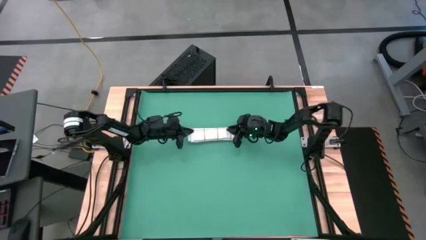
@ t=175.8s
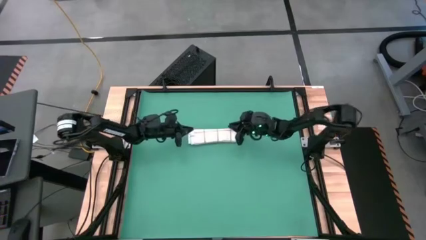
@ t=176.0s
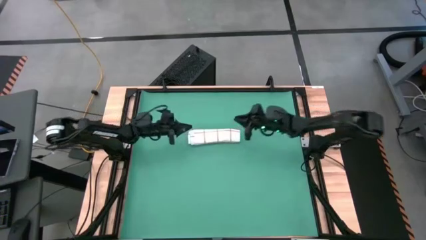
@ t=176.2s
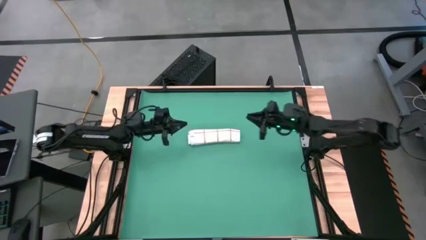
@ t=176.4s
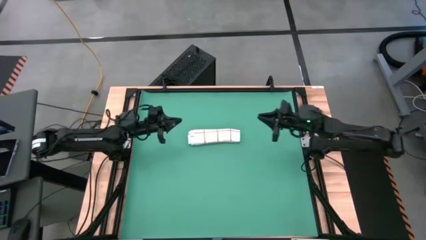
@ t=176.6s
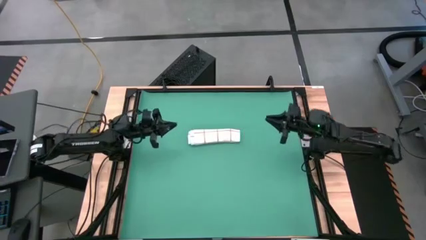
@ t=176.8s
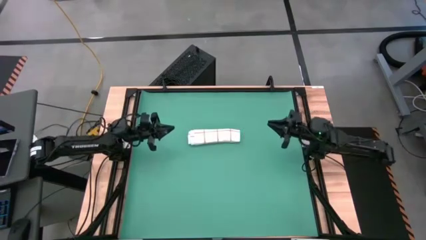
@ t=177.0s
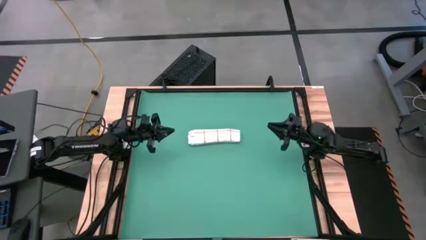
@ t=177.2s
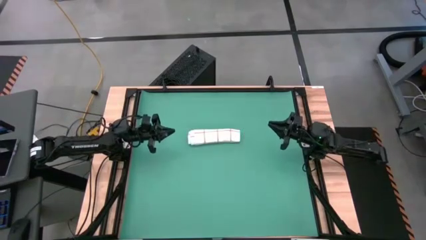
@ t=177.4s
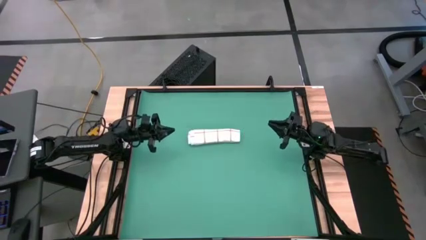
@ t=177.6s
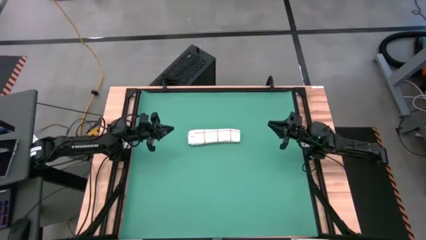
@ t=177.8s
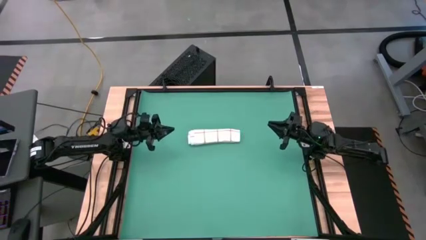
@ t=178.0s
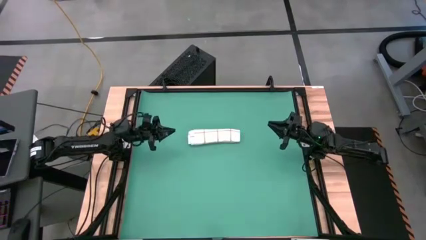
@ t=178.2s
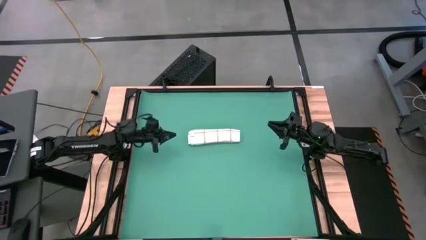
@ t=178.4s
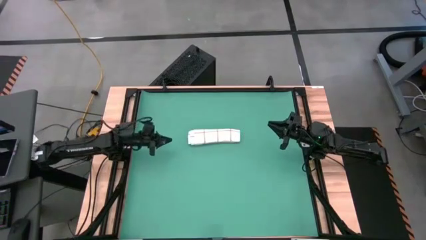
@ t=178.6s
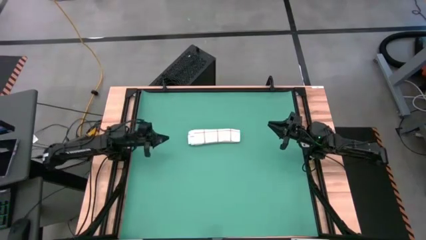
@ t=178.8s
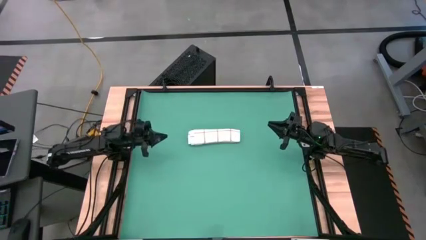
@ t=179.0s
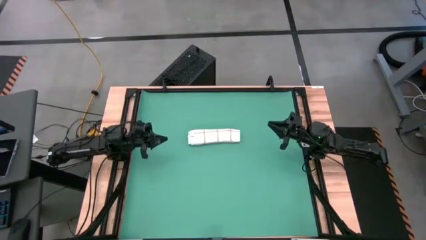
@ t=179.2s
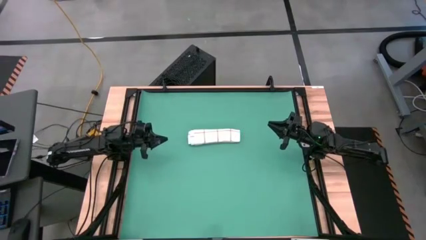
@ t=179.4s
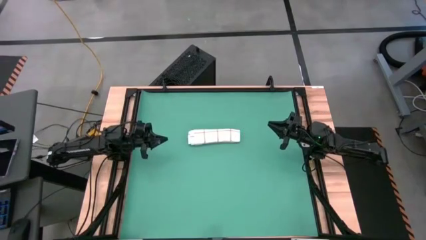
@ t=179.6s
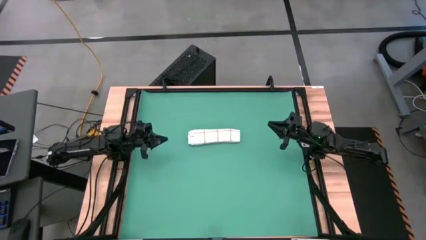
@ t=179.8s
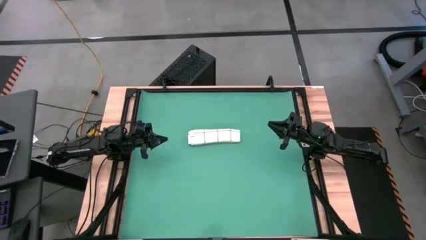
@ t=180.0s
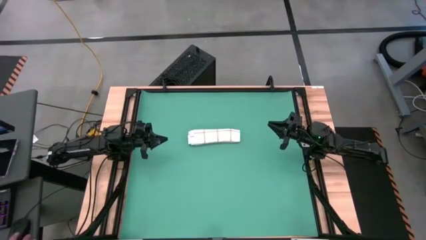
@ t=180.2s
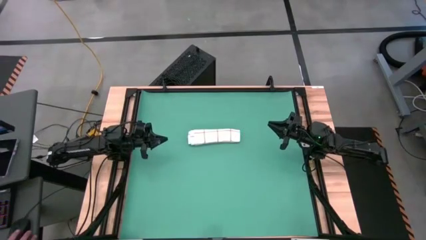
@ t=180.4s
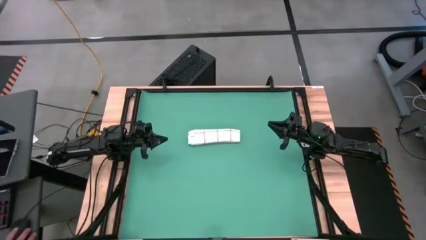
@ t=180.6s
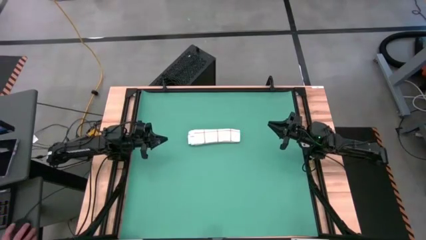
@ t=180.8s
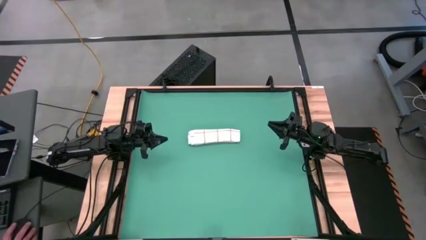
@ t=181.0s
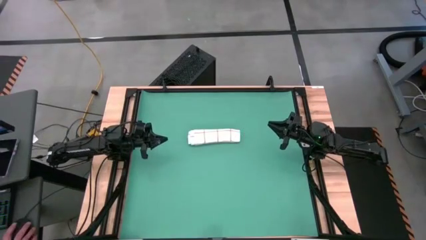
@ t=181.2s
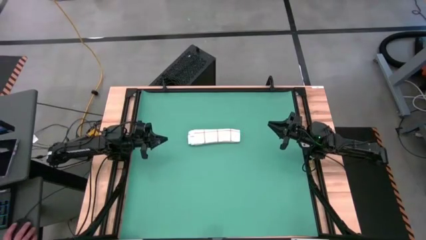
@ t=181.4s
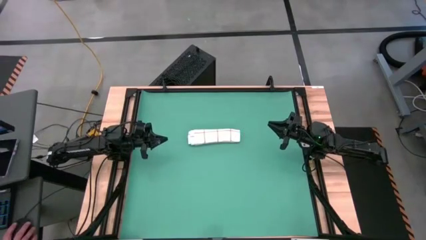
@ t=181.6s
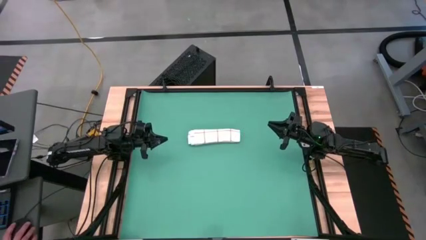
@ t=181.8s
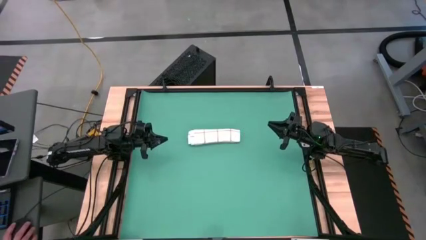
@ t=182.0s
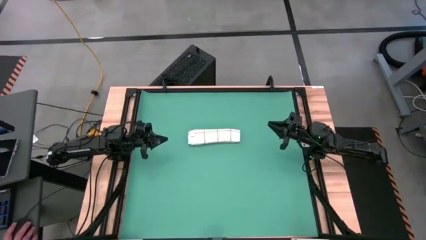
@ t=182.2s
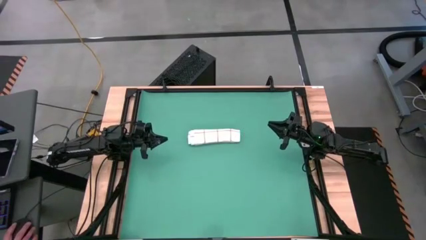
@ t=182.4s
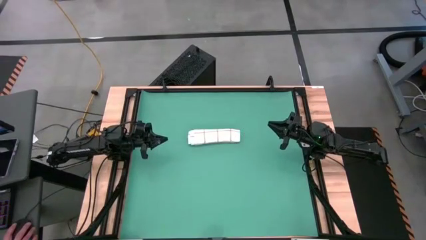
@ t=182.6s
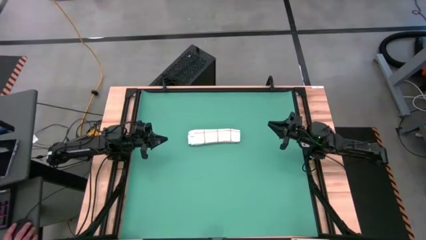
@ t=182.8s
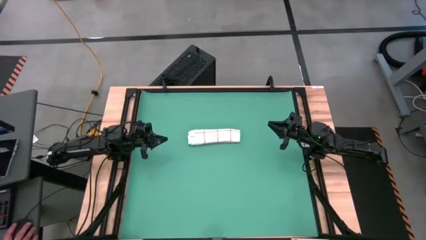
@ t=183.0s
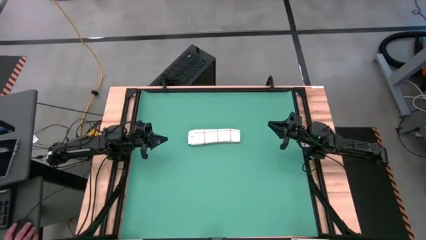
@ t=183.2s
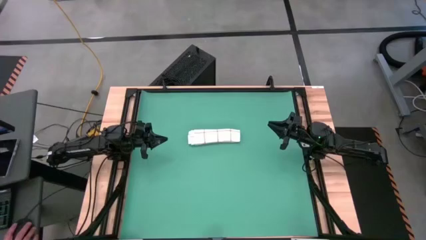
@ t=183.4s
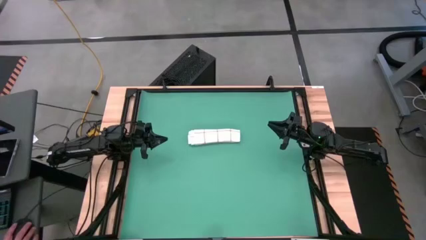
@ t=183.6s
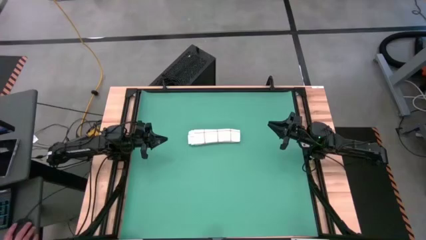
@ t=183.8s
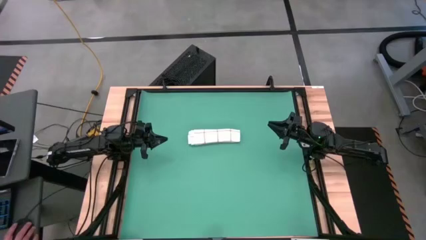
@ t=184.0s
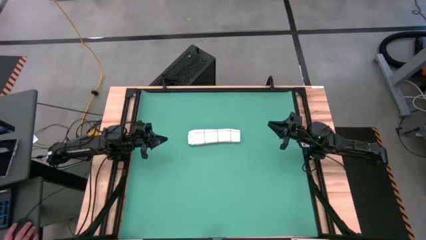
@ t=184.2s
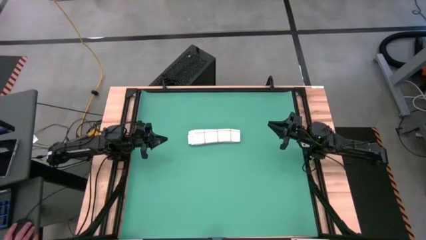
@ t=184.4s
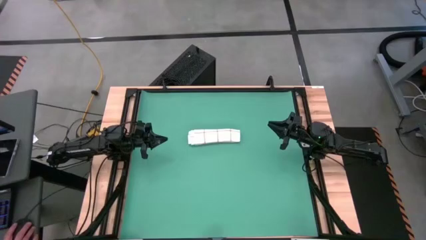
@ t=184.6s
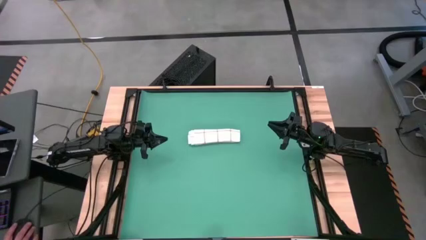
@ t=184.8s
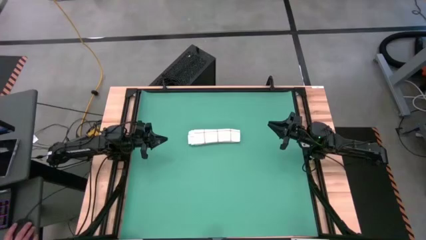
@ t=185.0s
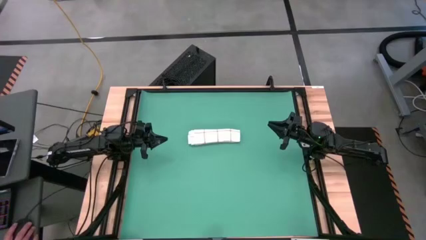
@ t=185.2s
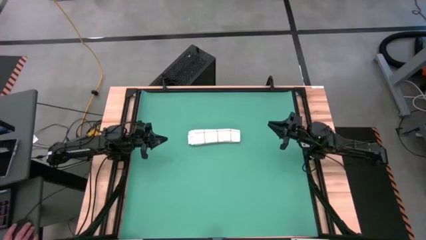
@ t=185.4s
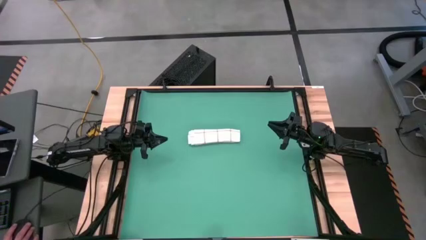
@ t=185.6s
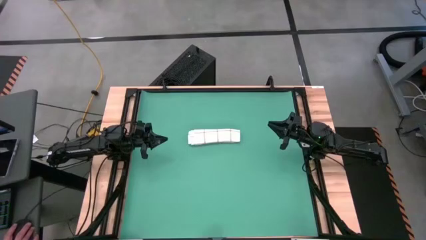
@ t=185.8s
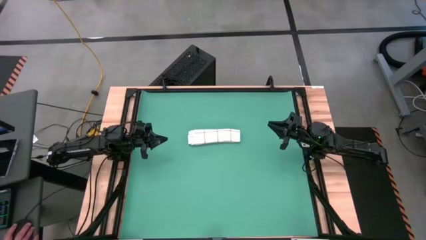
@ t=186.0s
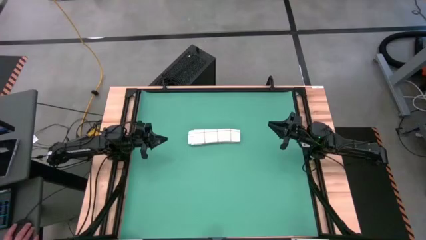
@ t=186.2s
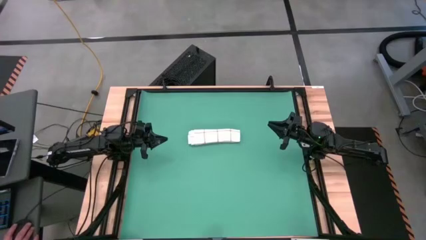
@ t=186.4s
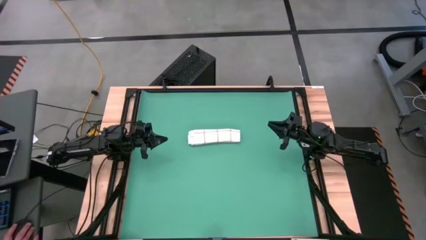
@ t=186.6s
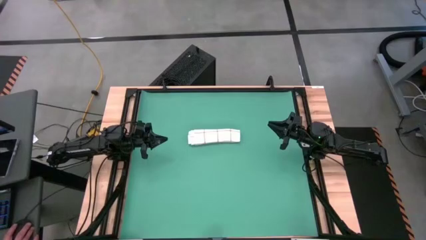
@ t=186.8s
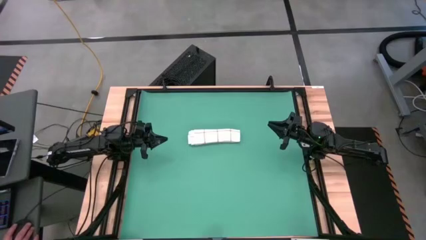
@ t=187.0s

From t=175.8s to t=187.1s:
Task: Roll towel into tight, uniform cylinder
Return to Home Position

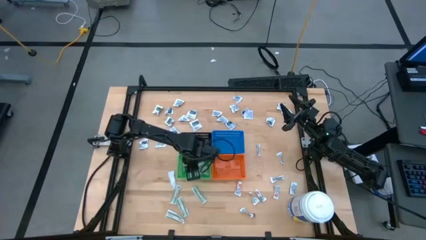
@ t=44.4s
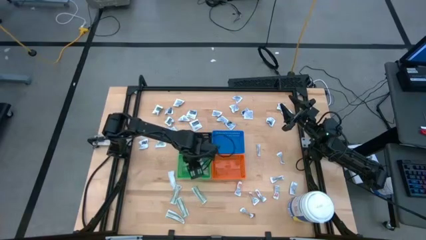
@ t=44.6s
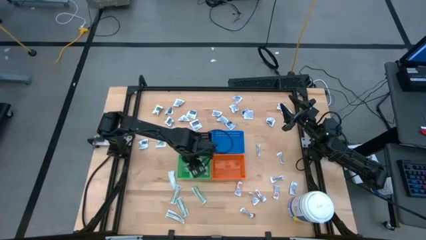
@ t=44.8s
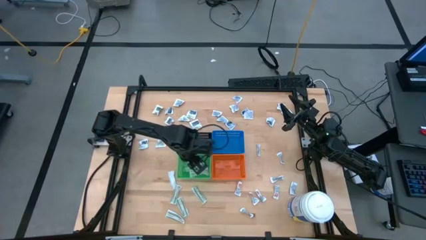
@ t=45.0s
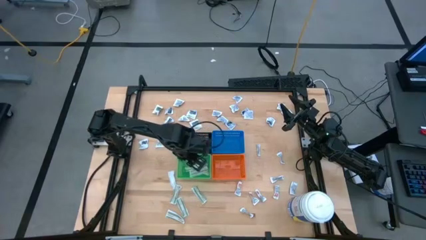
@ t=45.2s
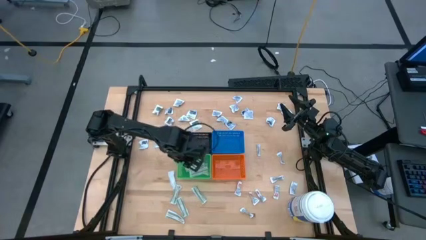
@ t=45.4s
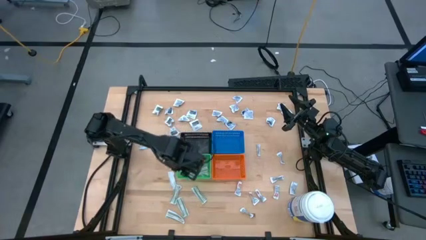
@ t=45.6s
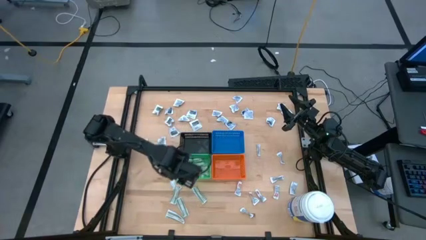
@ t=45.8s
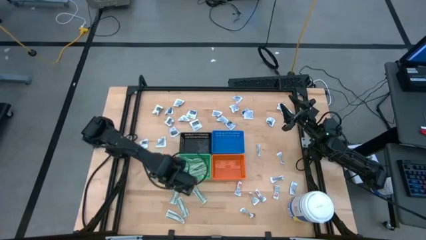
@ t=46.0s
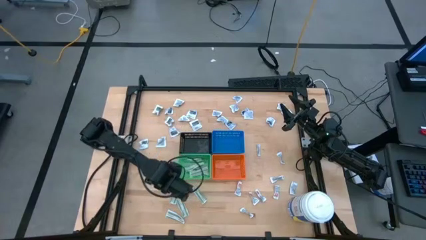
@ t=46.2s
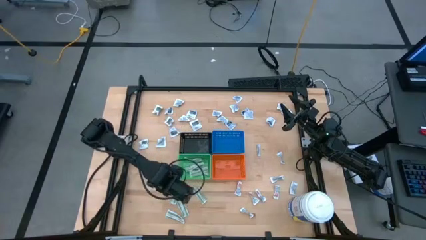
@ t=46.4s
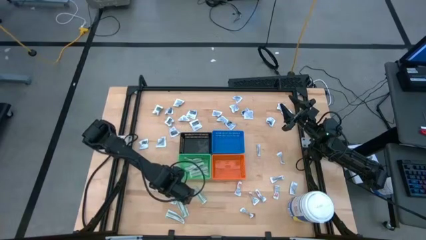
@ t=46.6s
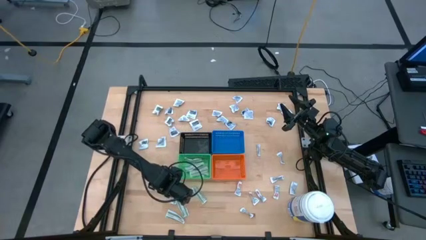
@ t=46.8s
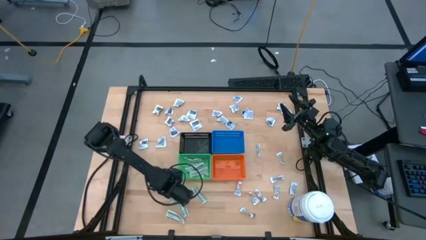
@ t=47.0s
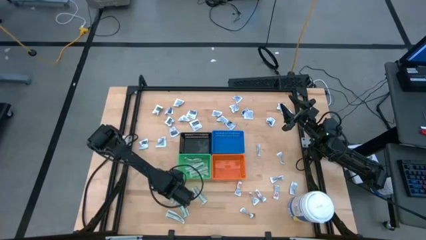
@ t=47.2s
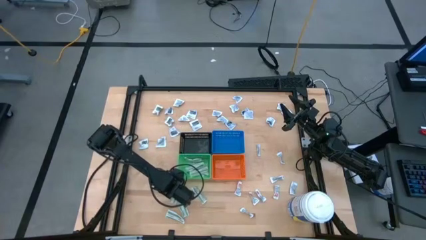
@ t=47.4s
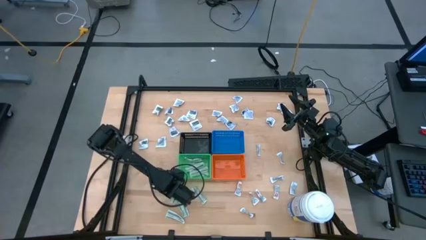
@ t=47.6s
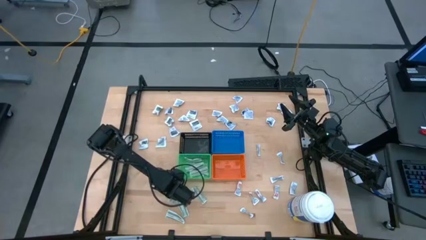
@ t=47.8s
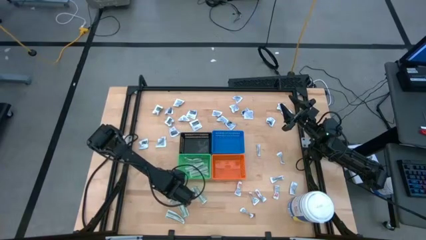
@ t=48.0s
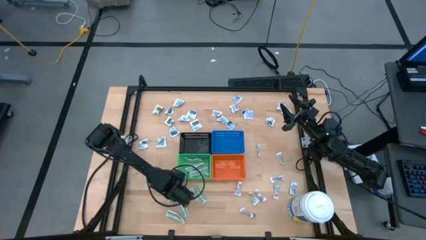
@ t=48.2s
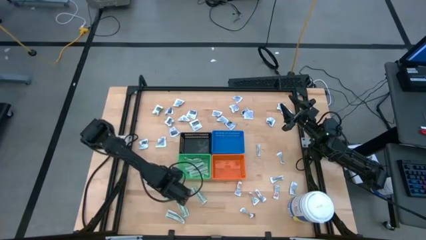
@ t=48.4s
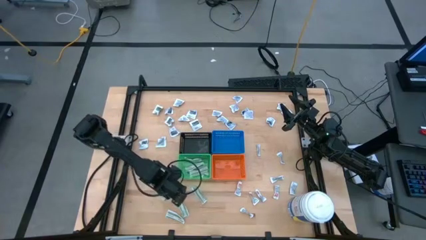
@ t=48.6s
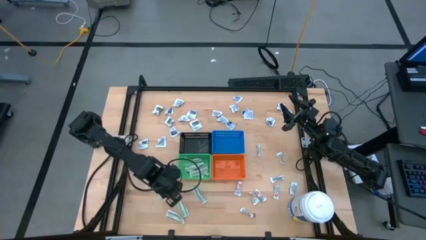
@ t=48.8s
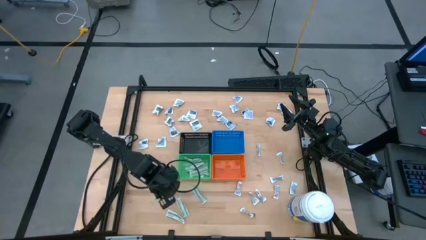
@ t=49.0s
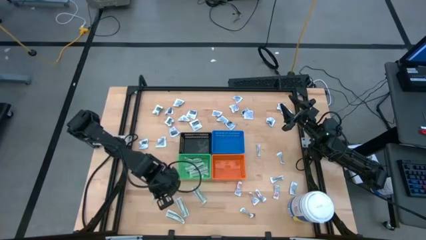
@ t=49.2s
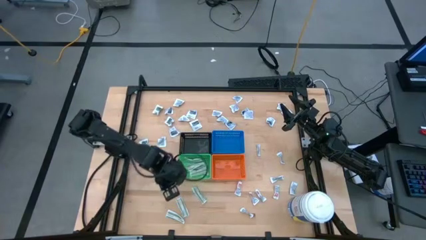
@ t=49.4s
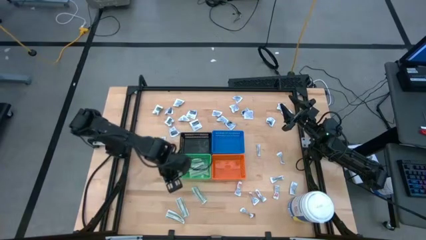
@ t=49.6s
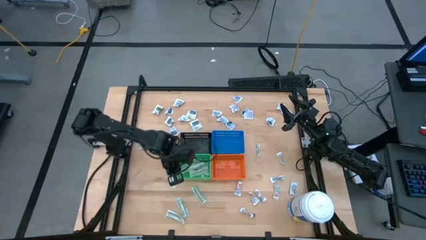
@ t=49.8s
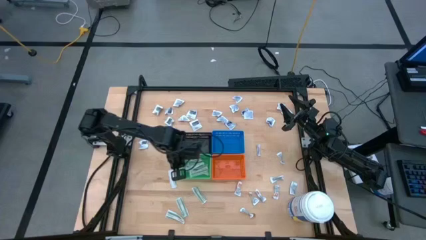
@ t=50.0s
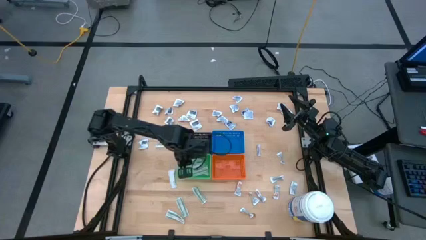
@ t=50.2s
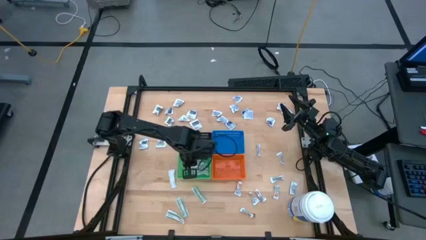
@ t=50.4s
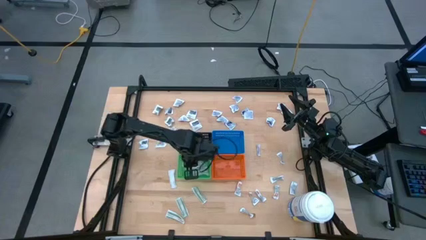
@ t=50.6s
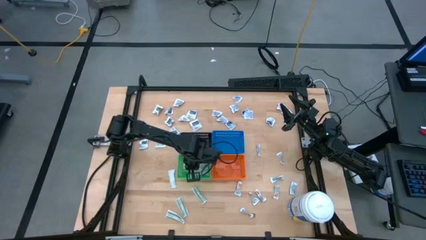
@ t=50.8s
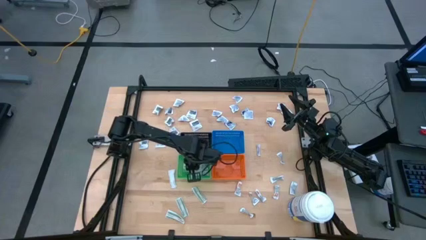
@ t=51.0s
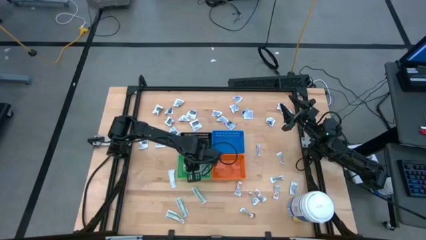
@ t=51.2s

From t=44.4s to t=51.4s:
Task: Pick & Place First Aid Supplies
Put the bandage into the green bin
